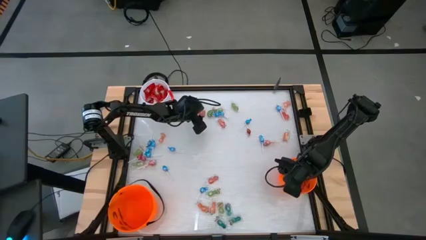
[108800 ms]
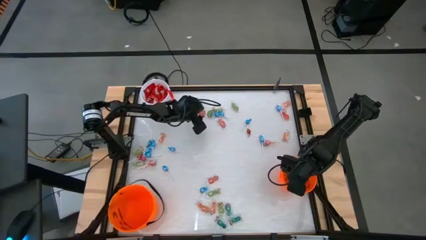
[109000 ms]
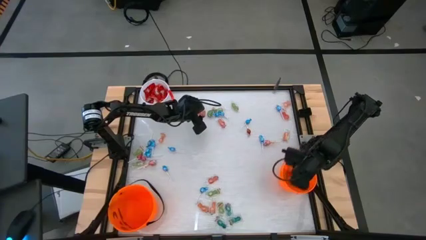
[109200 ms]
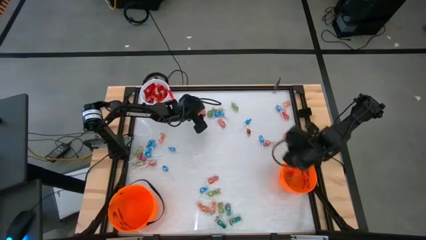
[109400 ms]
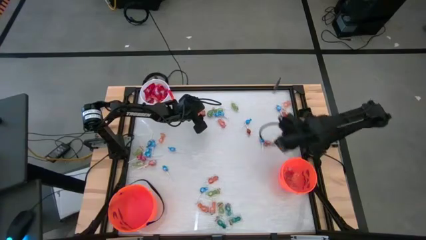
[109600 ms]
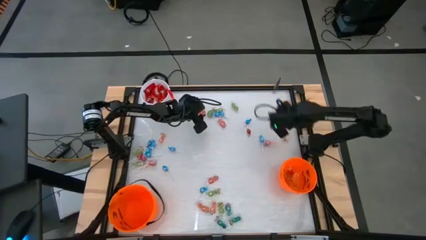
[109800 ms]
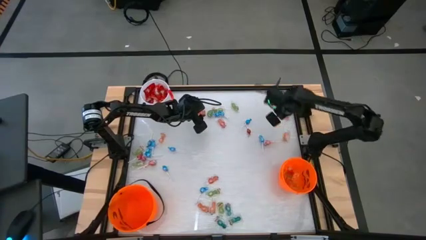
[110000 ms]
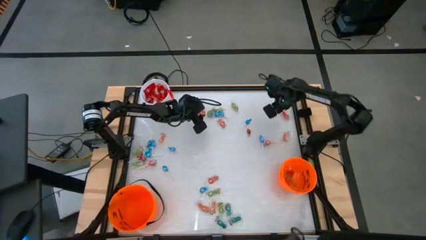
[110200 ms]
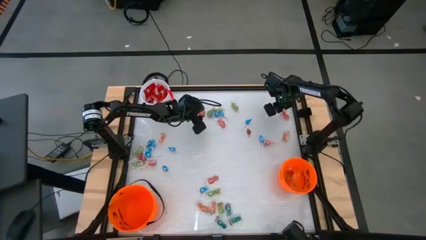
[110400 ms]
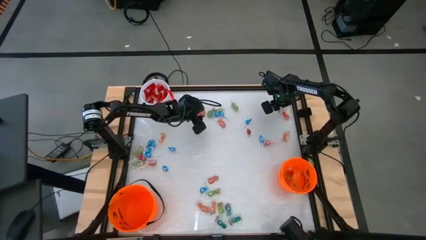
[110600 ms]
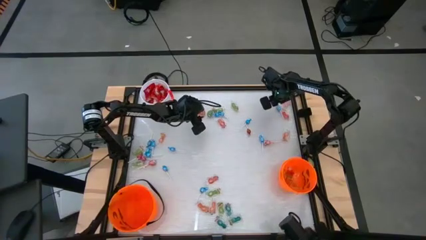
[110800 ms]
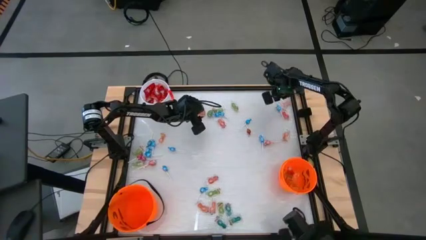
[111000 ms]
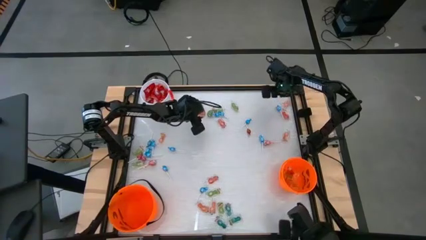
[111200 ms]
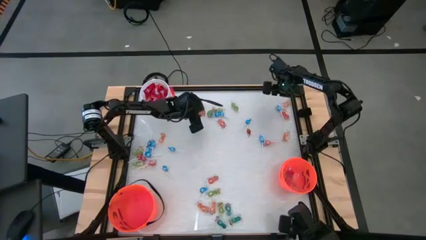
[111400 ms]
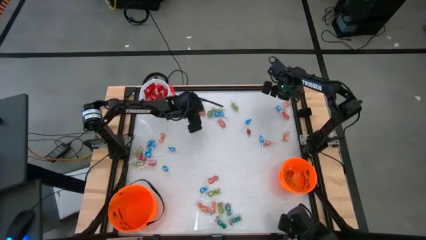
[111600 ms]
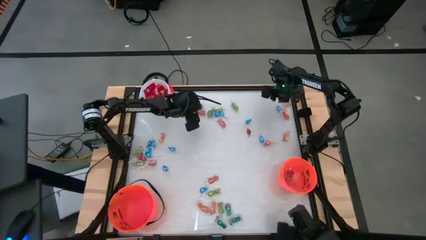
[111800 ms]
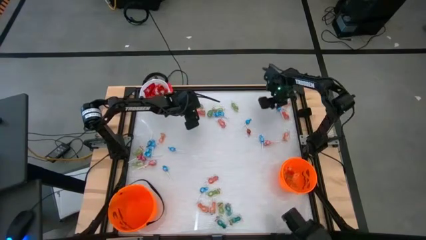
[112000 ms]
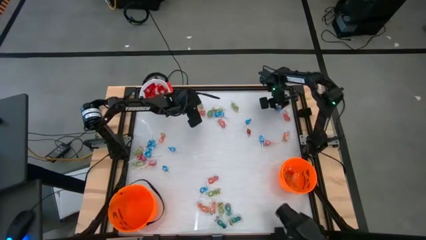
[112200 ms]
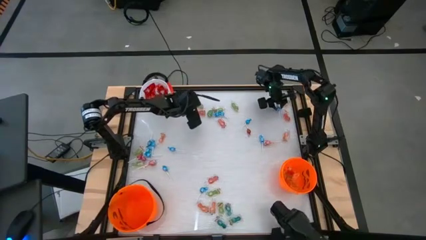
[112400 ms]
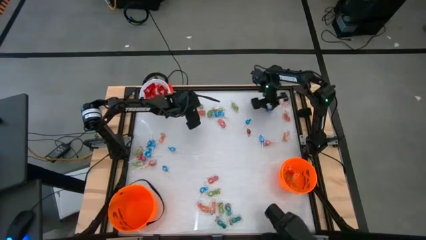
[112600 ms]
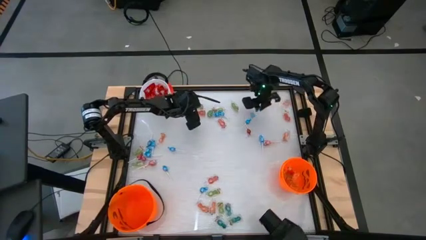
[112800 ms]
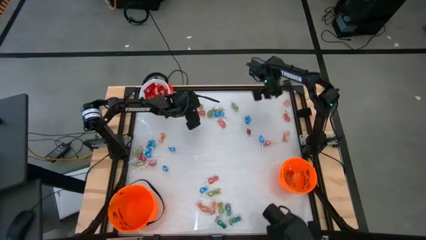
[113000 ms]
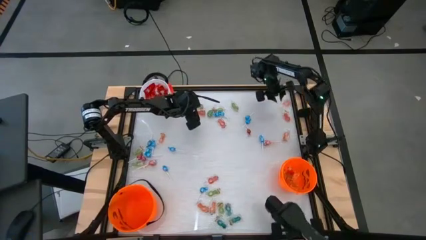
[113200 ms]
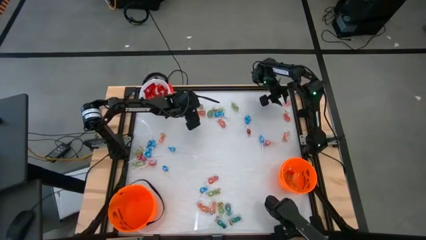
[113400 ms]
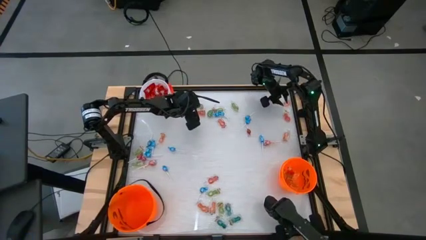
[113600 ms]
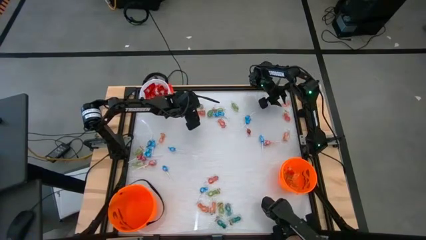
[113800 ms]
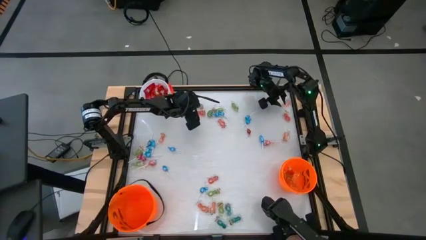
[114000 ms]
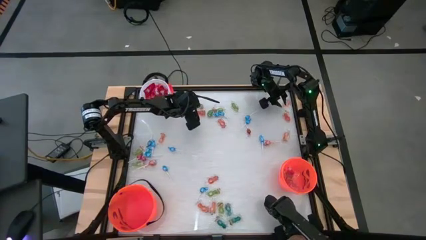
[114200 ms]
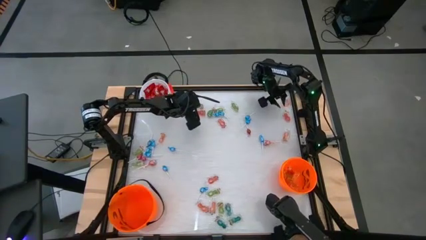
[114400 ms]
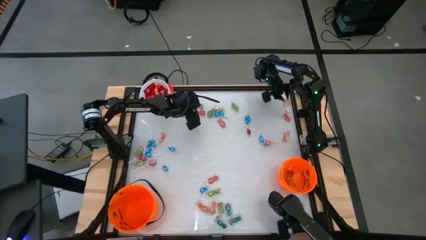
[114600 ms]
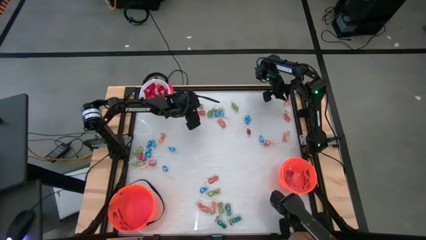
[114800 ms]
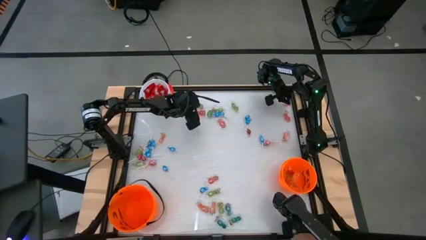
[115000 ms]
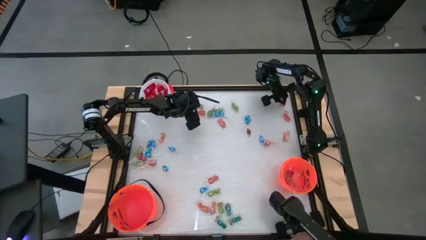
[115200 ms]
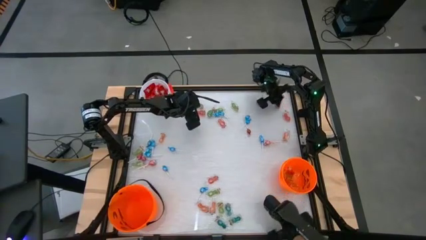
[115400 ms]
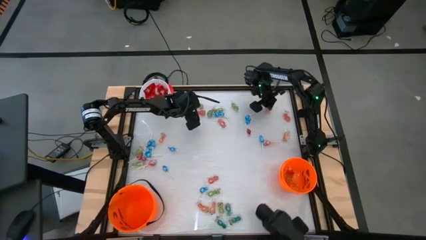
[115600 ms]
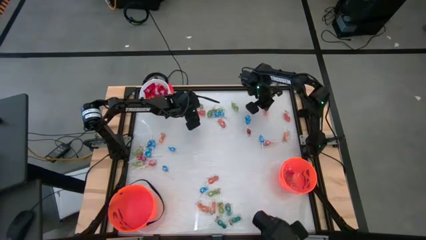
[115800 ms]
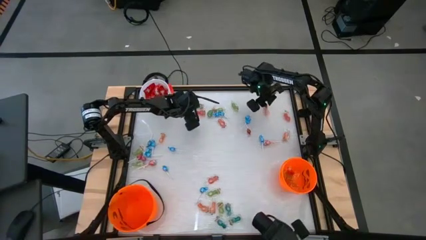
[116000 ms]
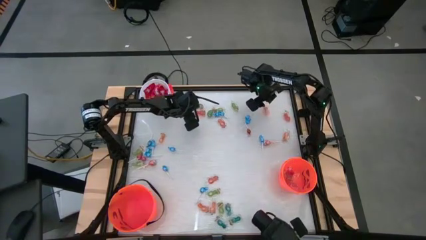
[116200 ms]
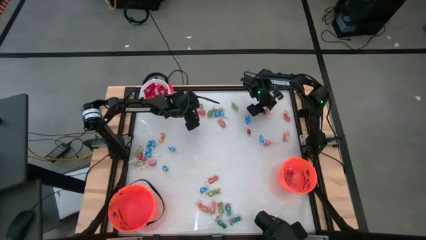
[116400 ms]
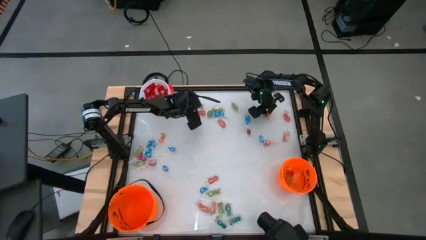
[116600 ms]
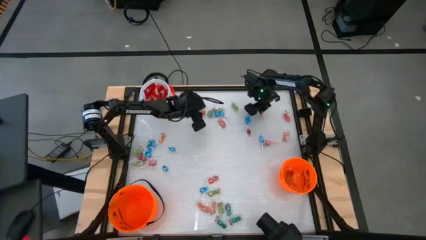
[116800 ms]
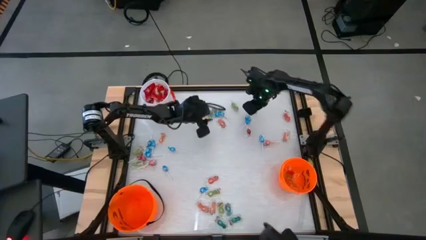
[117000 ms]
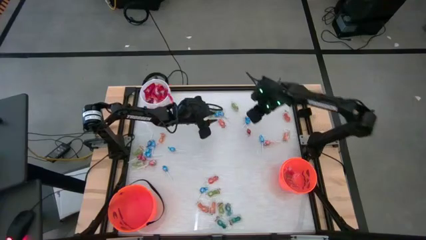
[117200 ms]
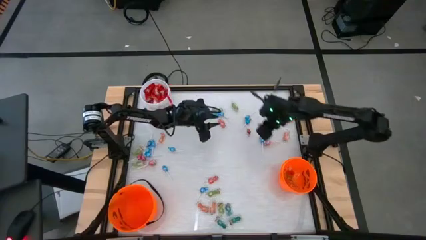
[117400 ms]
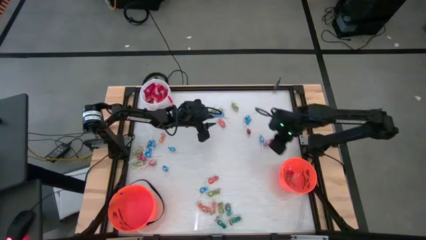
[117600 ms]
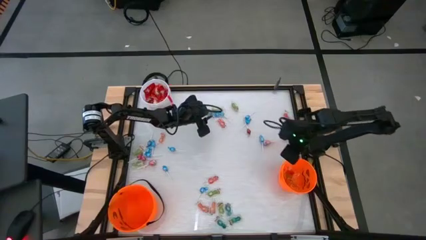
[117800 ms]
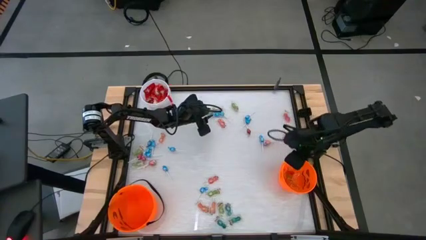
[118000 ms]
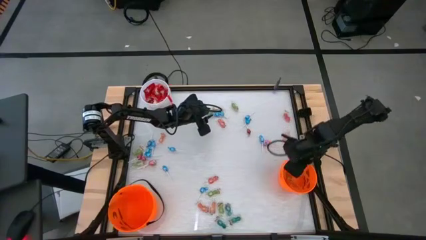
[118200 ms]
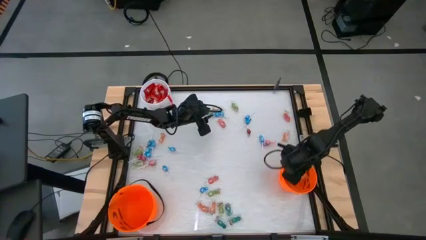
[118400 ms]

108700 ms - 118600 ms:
Task: Sort candy by brand, put in halloween buckets
Put the orange candy into the right orange bucket

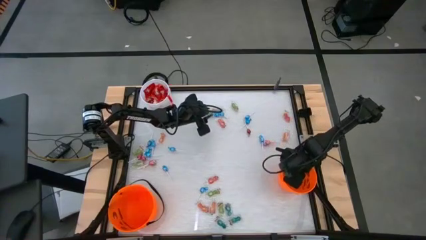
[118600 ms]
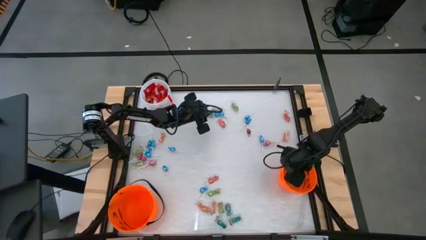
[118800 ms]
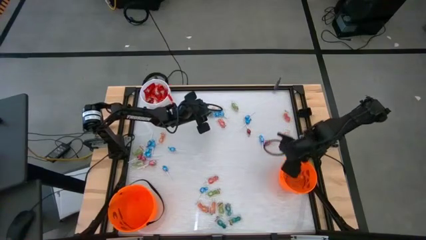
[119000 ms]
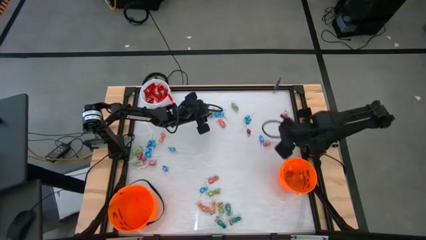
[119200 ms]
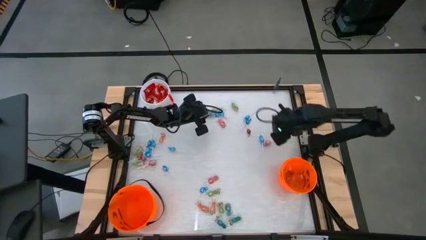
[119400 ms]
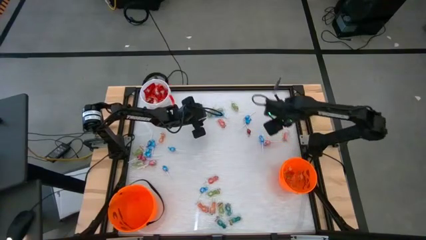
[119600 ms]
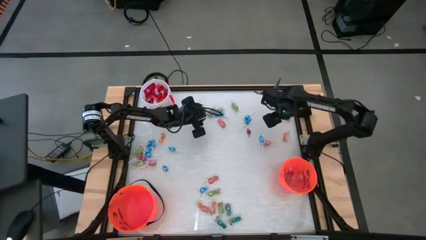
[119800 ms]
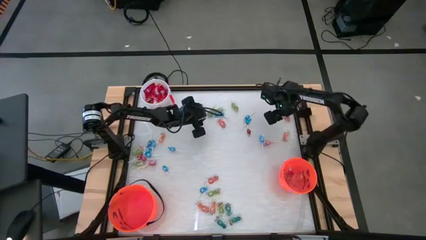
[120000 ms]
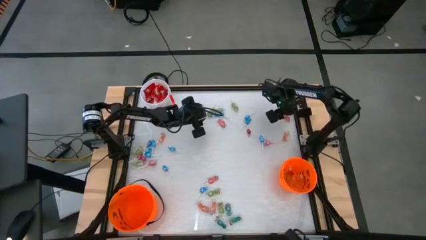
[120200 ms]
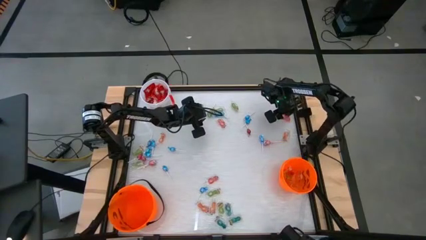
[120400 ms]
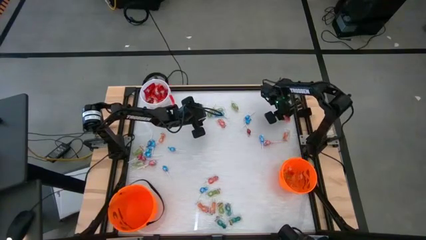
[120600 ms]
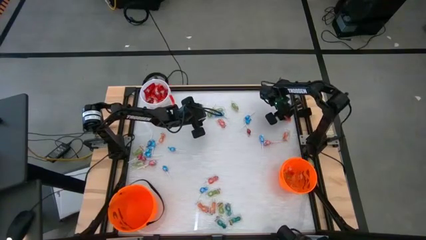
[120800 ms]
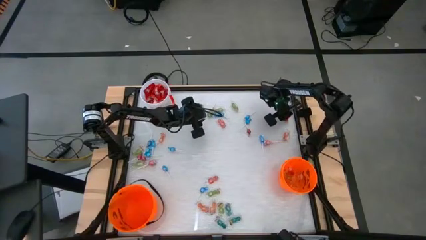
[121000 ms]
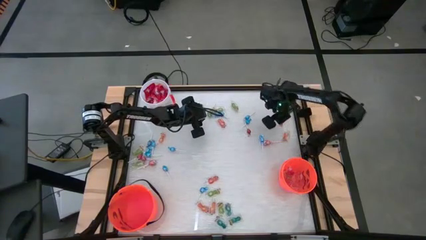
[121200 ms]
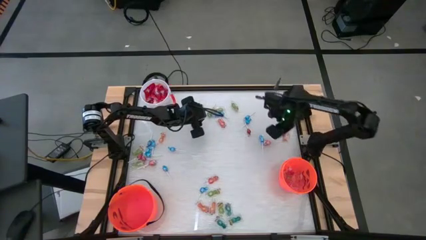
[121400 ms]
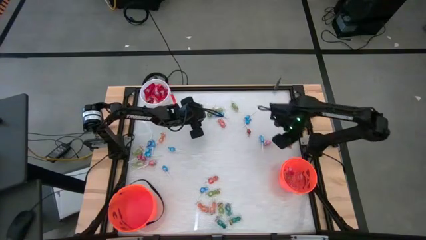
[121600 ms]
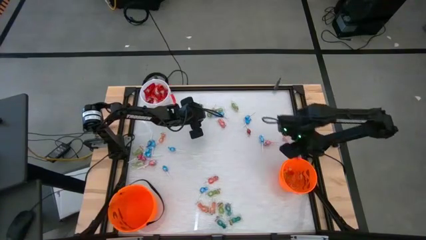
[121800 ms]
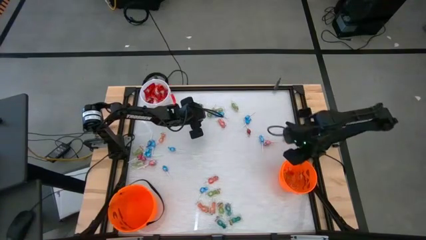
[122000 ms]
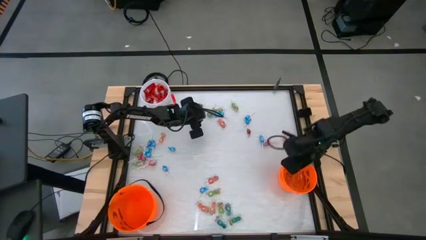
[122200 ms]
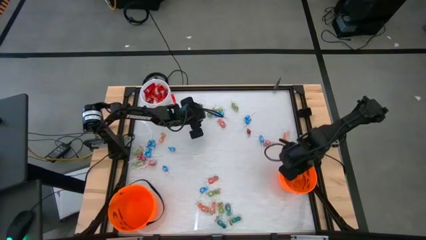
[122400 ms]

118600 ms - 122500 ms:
Put the orange candy into the right orange bucket

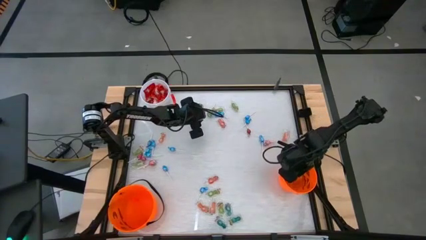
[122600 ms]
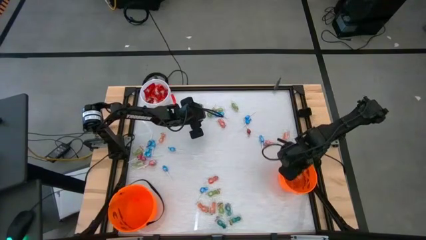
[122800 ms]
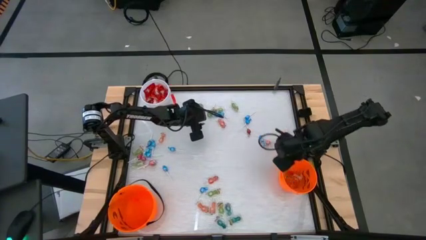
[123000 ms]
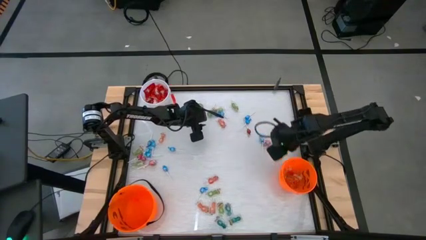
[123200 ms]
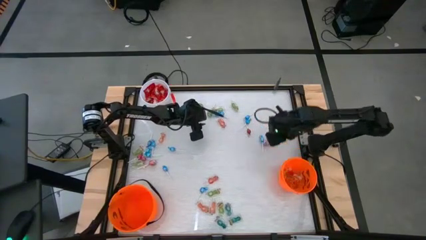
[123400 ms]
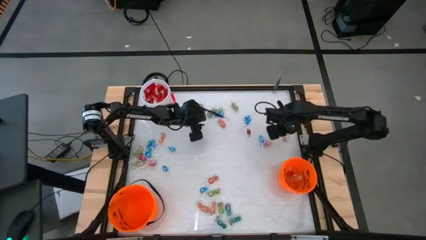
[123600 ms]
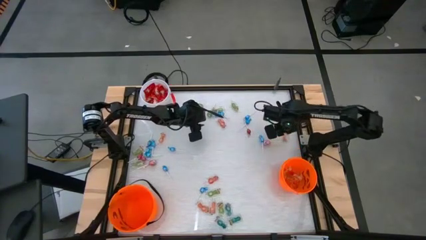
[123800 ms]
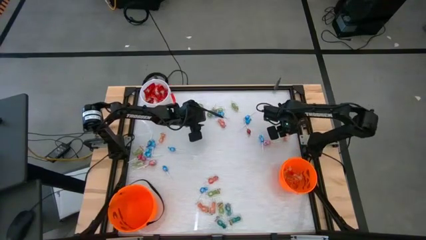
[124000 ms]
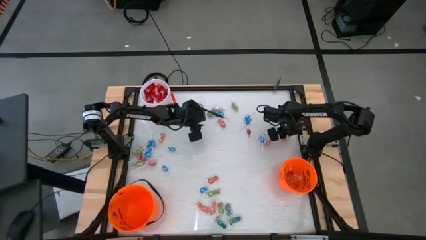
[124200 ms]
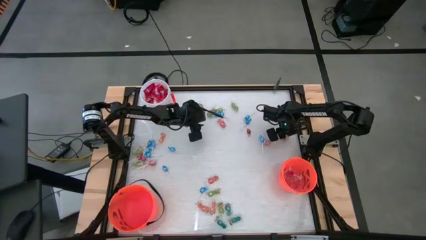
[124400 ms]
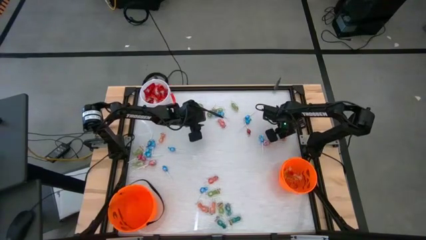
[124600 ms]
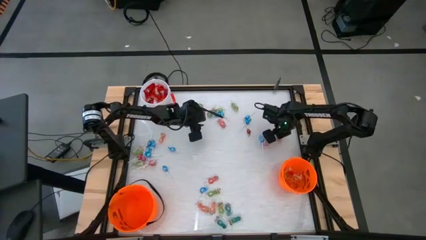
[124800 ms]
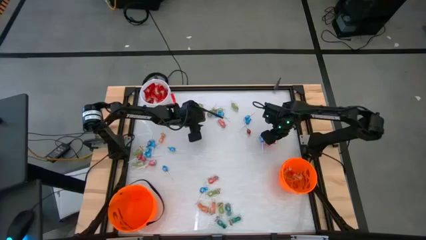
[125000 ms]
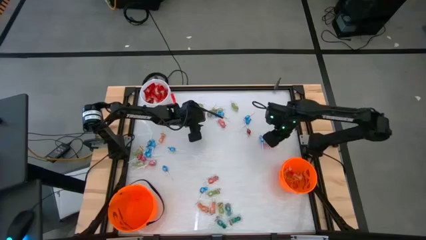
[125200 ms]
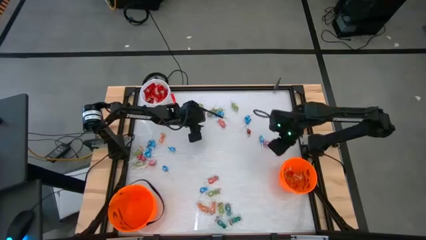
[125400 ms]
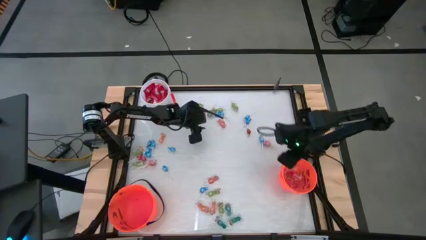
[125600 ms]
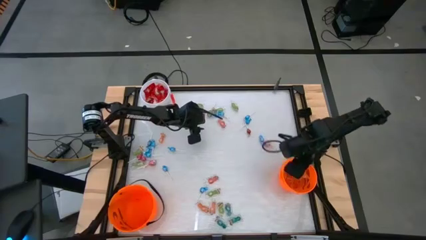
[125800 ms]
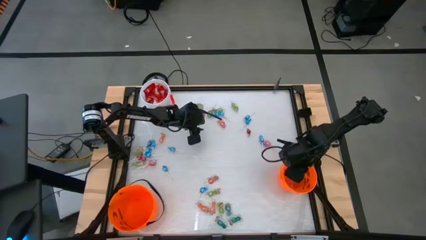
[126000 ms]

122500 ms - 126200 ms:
Put the orange candy into the right orange bucket
